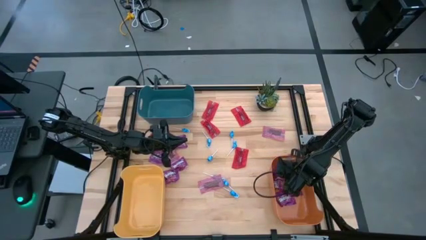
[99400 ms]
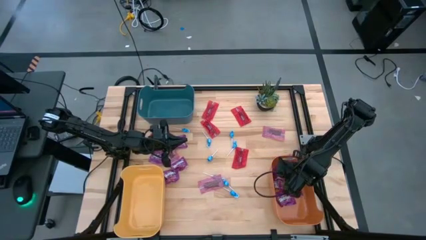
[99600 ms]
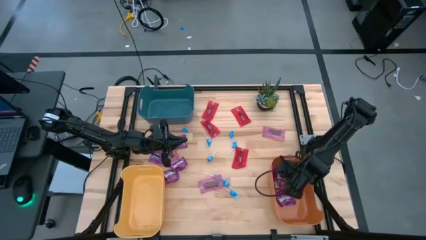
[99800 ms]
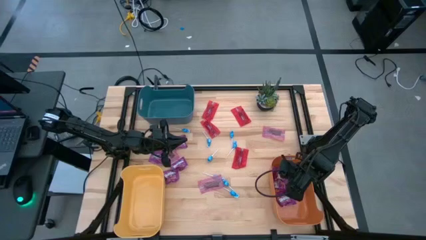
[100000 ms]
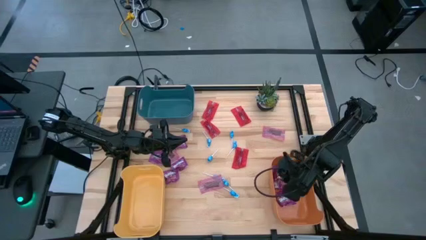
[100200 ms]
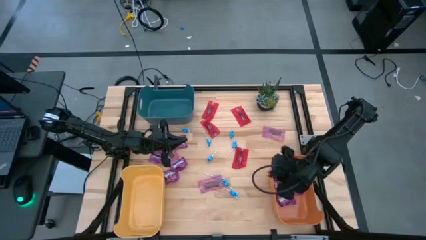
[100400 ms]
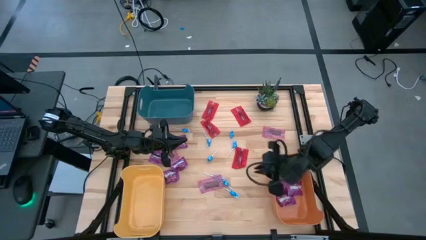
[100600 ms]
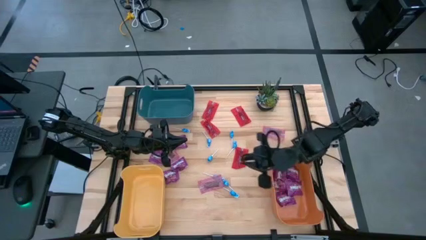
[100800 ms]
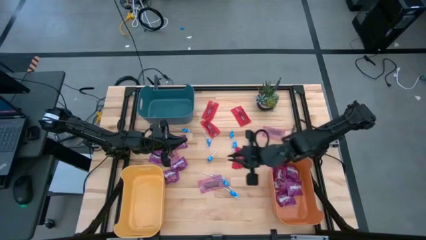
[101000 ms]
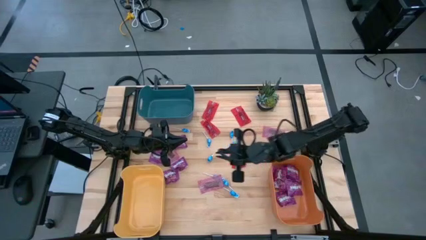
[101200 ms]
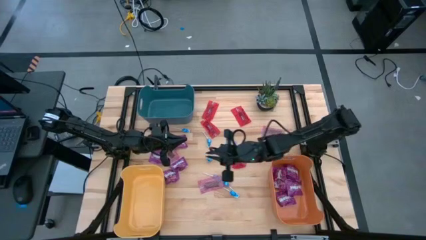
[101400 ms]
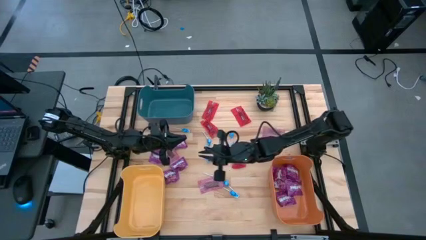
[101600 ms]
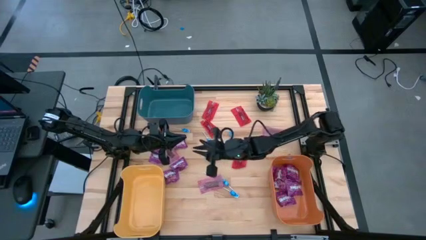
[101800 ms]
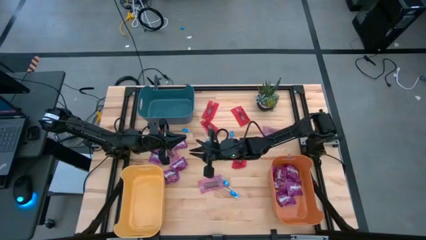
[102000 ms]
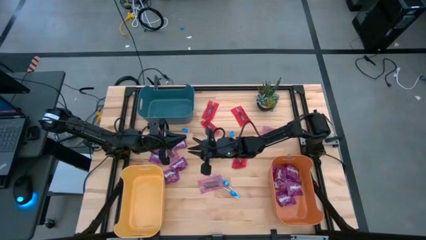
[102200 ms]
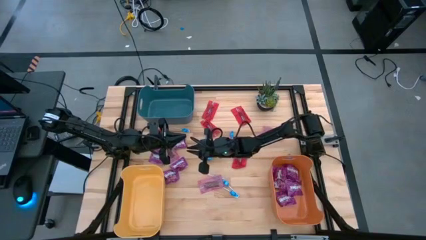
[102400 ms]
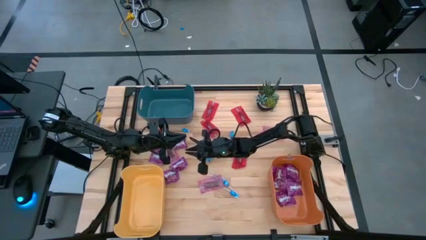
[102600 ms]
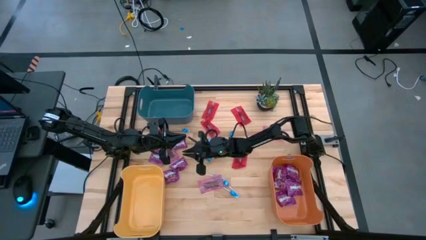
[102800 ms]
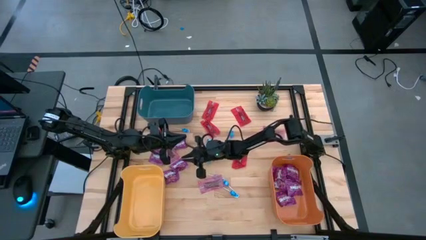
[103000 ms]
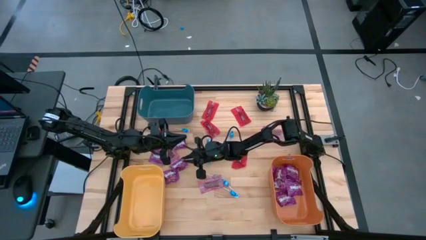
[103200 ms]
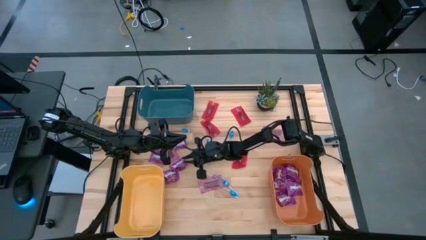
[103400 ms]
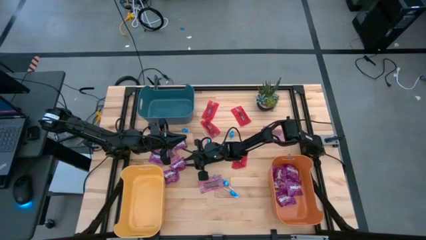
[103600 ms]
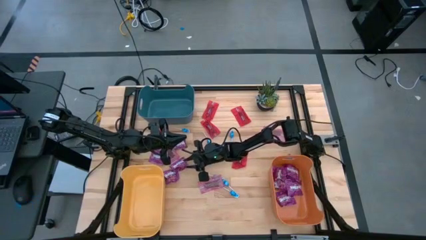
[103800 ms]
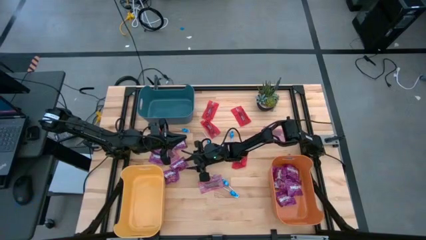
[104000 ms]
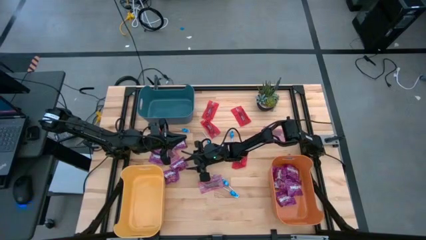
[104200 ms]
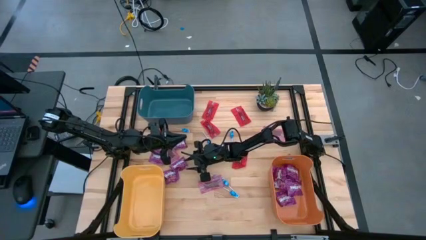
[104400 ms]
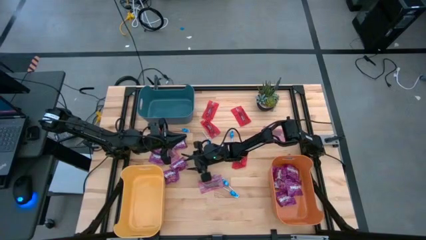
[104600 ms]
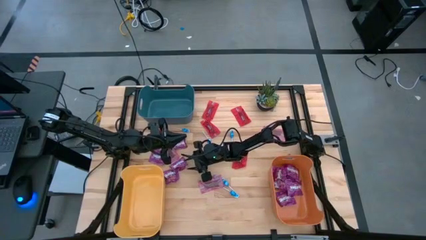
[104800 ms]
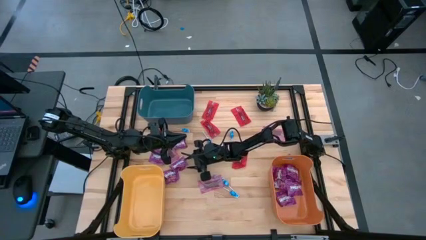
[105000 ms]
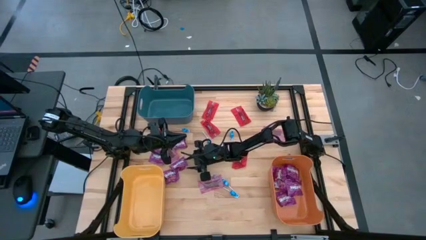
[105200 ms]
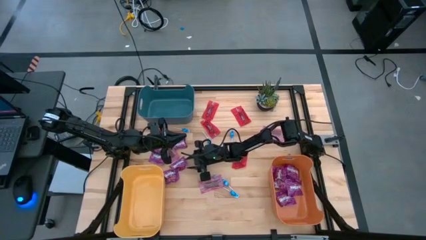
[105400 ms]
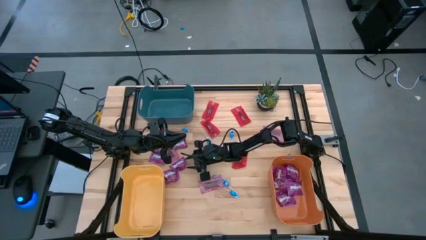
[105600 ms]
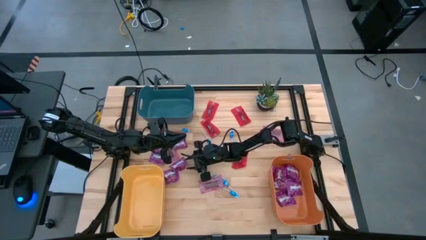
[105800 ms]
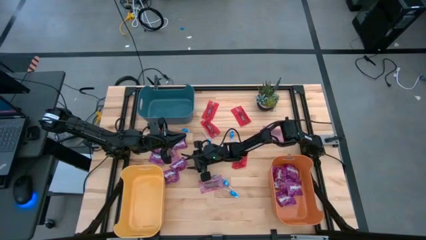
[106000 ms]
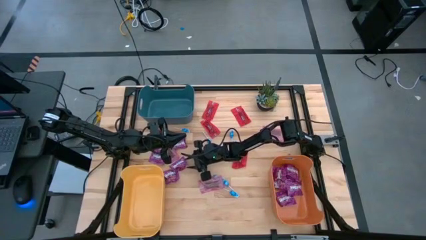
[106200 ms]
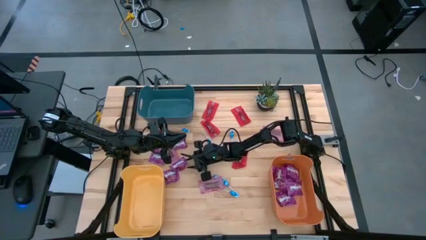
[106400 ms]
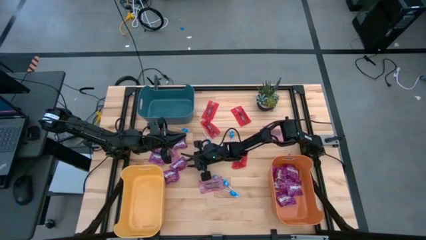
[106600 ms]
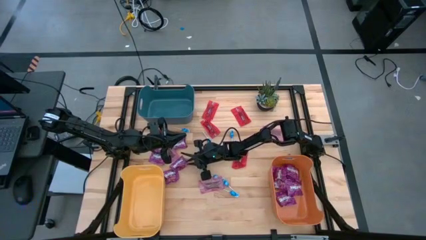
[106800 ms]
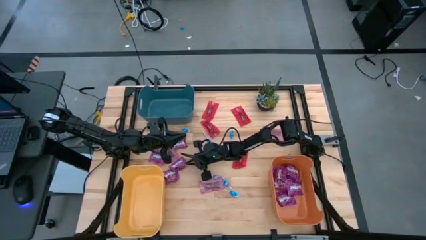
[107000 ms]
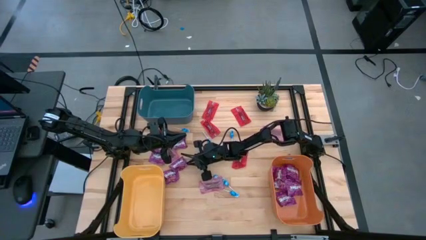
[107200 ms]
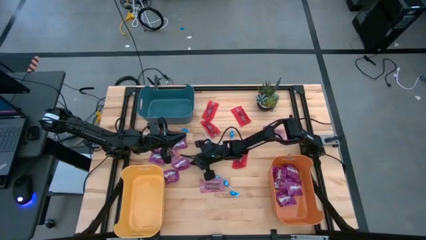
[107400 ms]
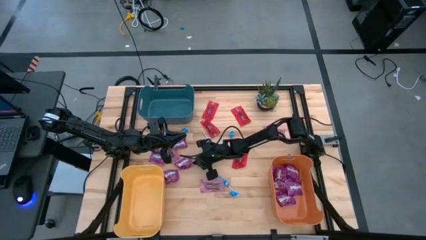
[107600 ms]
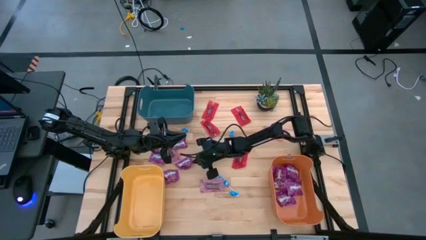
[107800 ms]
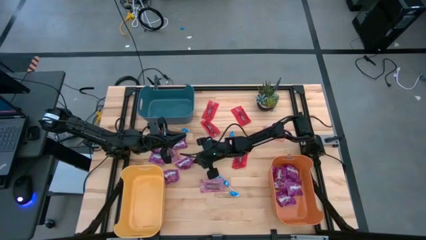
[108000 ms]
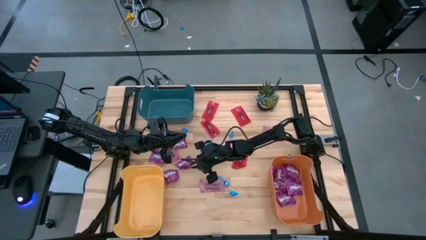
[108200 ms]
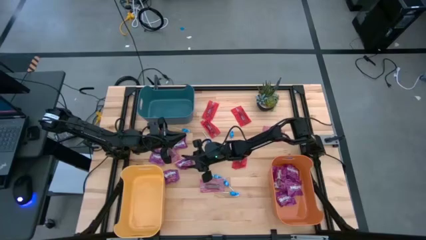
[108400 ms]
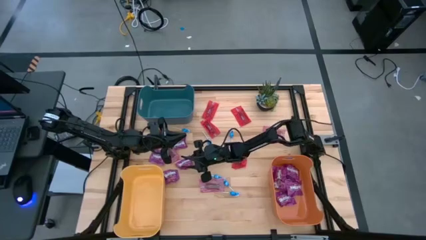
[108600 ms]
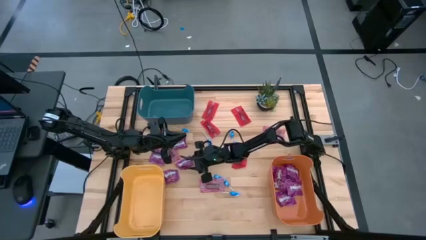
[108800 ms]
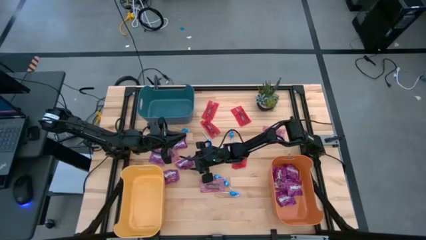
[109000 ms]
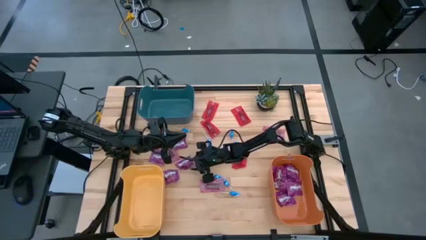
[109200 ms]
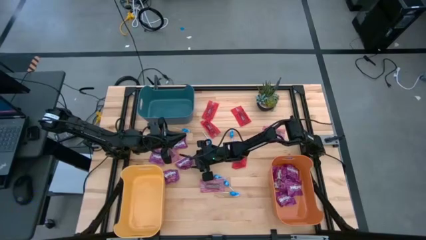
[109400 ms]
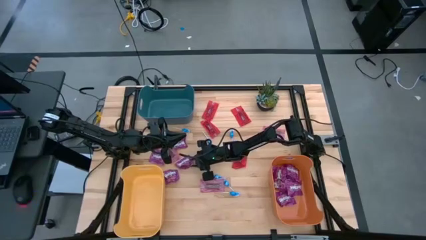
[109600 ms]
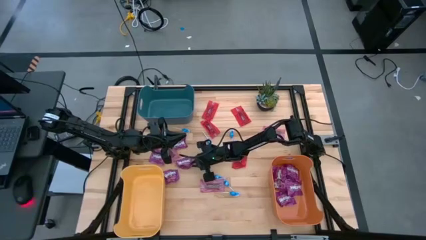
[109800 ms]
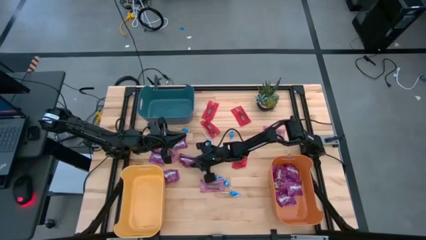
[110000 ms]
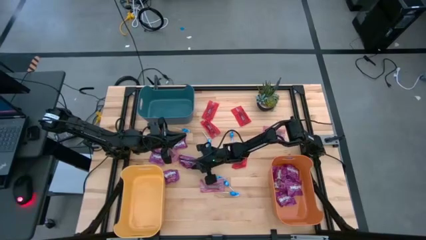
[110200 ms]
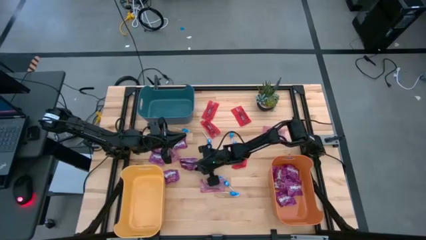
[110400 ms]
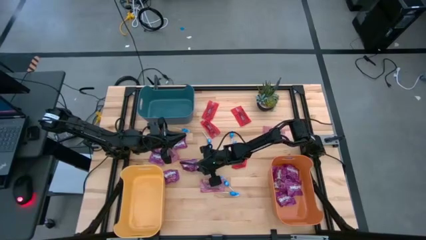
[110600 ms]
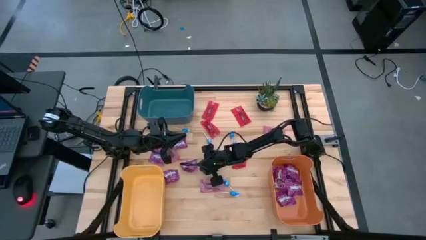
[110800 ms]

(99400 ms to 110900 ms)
Task: Sort candy
Put the purple candy into the orange bin

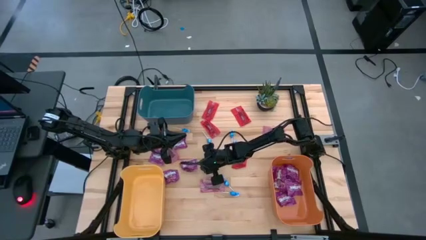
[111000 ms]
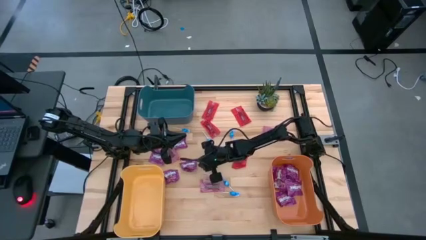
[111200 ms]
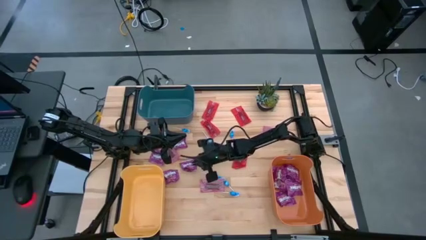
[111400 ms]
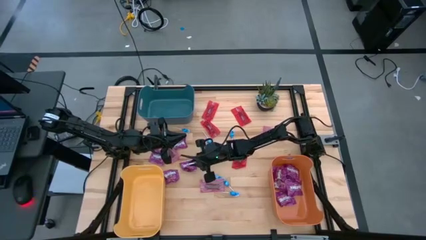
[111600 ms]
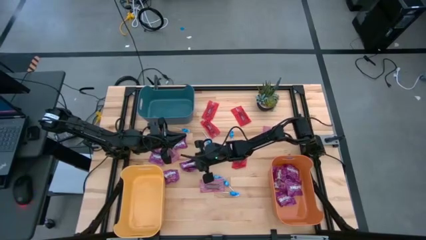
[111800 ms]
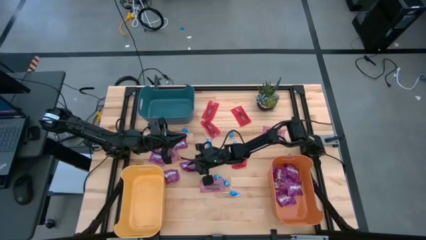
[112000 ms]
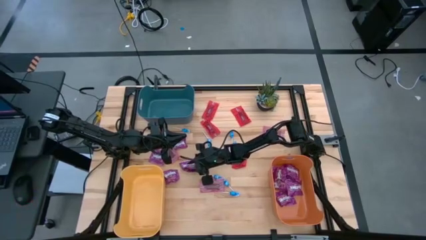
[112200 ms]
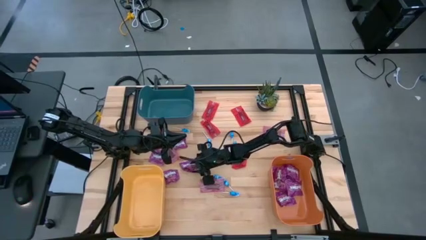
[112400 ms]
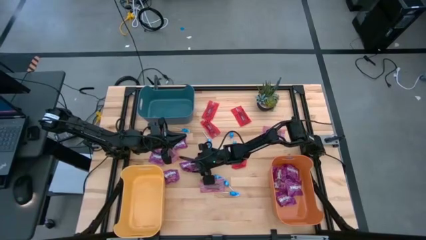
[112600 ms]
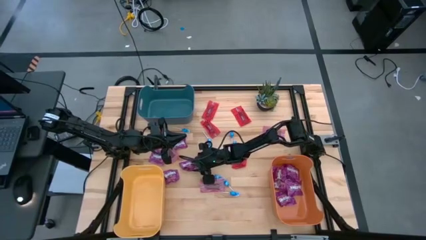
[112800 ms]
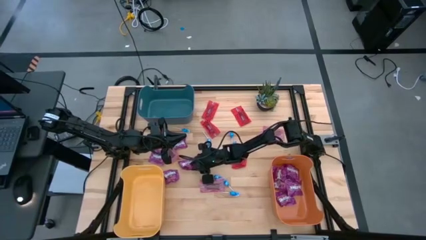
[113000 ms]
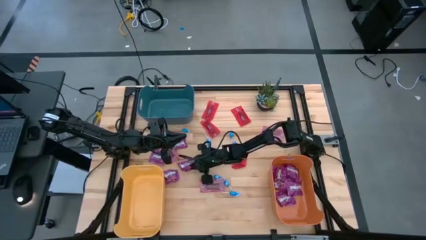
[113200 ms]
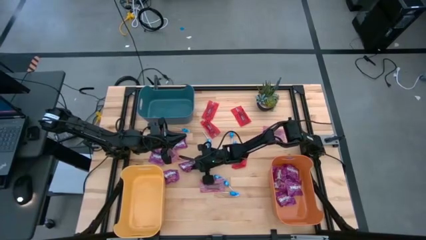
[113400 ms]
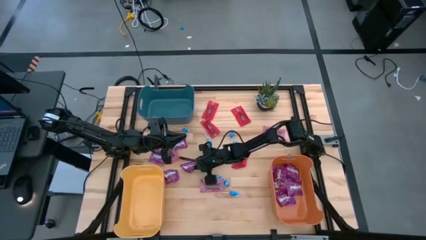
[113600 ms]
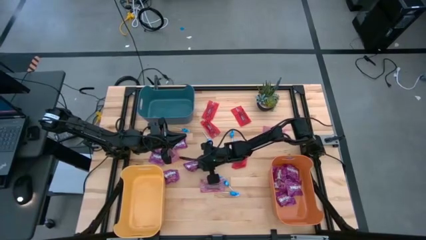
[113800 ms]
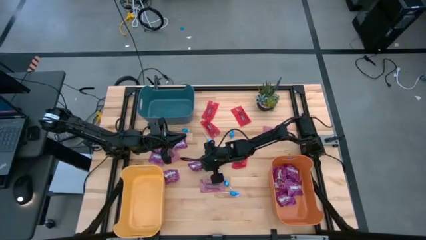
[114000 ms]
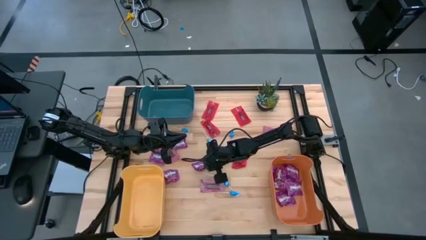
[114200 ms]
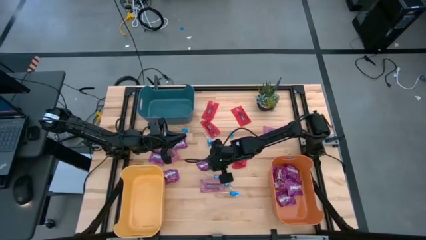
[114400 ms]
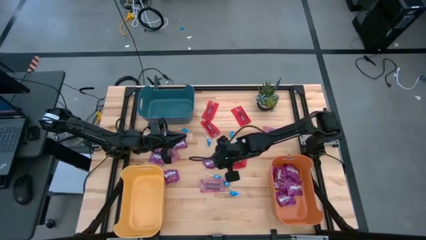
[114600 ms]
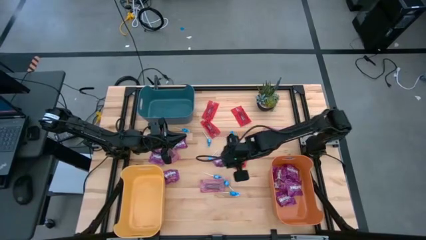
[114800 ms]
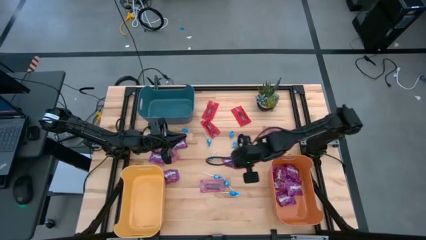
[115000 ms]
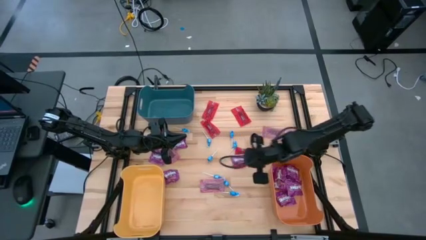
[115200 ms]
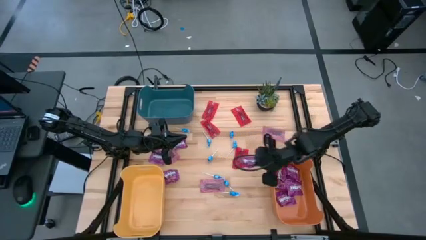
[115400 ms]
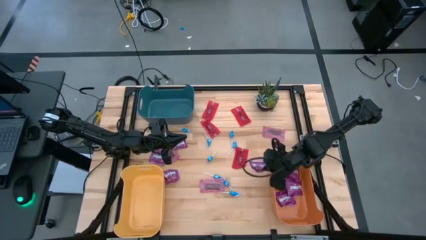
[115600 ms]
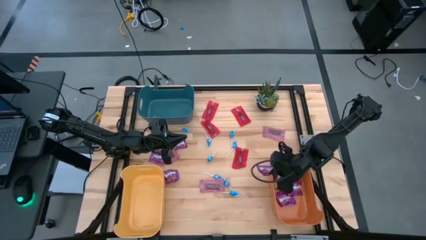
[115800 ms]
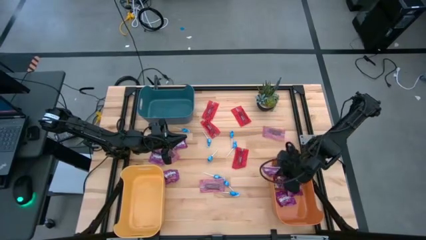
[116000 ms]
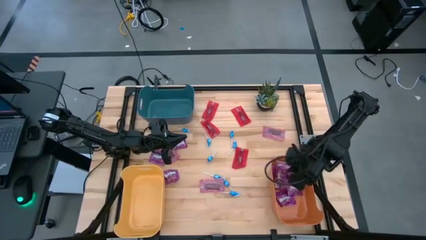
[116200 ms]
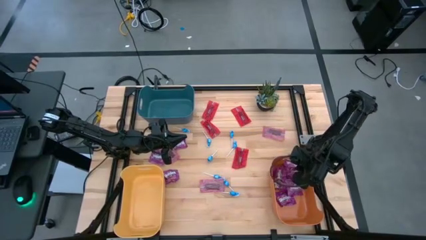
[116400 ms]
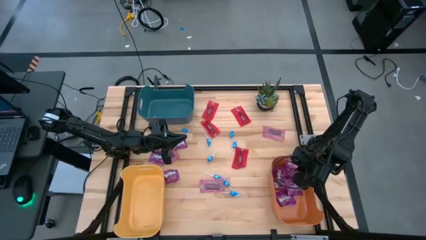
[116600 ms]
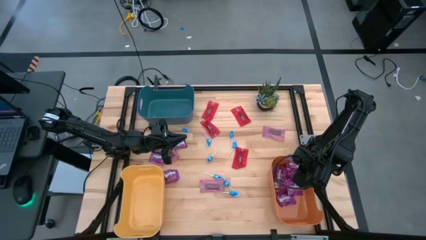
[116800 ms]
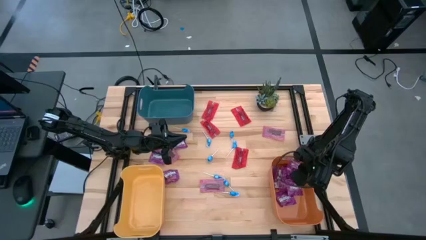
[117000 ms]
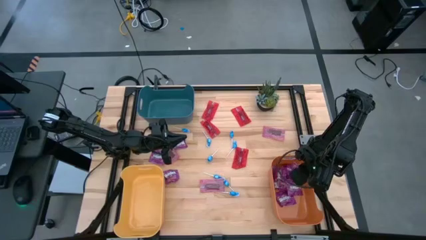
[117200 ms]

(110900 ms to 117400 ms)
Put the purple candy into the orange bin
